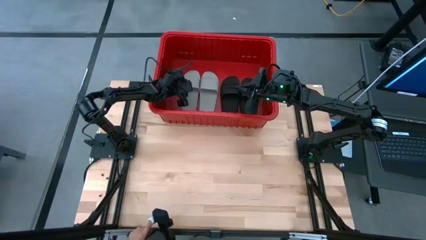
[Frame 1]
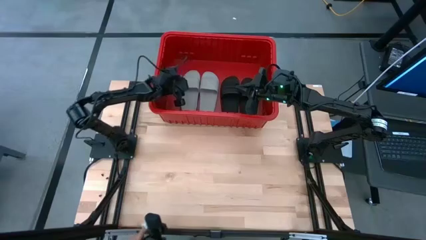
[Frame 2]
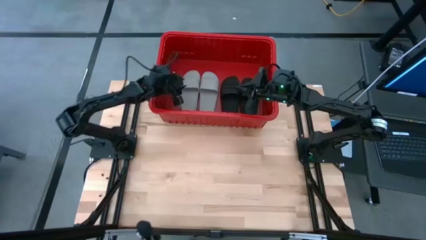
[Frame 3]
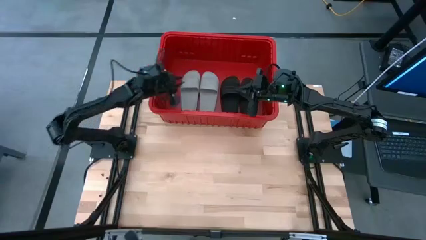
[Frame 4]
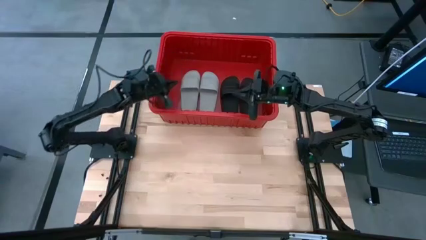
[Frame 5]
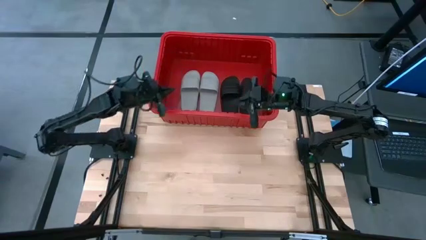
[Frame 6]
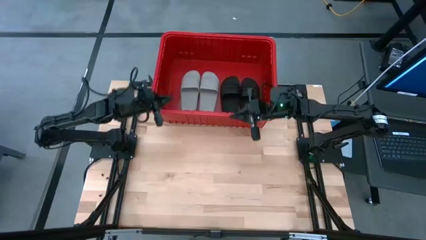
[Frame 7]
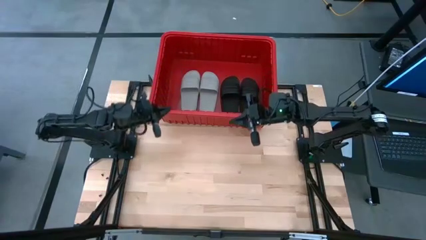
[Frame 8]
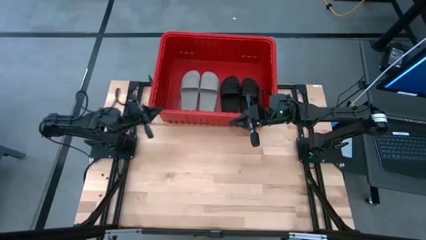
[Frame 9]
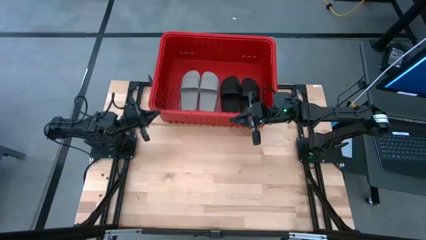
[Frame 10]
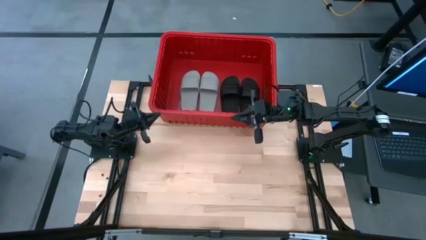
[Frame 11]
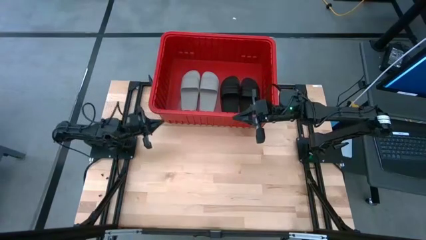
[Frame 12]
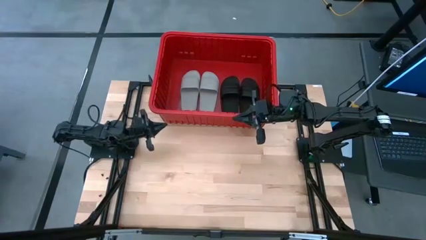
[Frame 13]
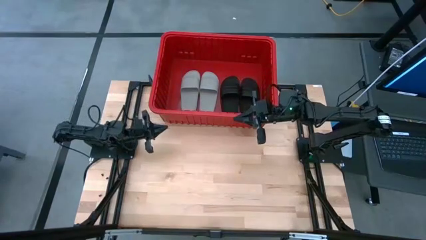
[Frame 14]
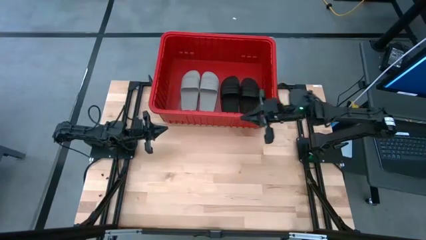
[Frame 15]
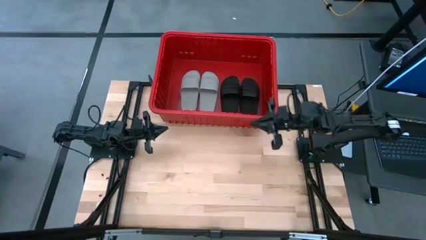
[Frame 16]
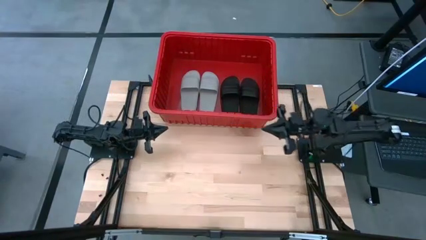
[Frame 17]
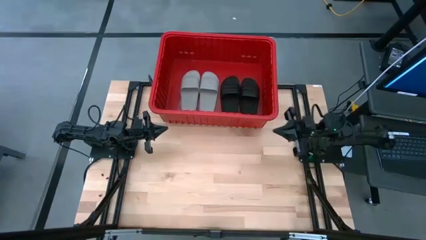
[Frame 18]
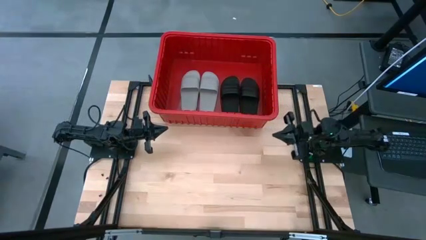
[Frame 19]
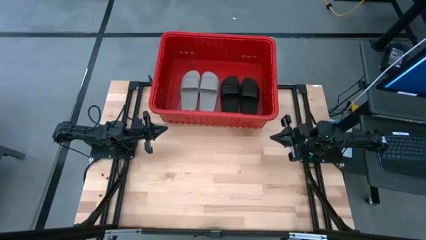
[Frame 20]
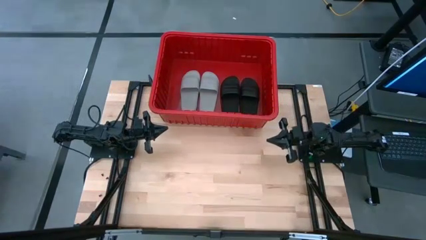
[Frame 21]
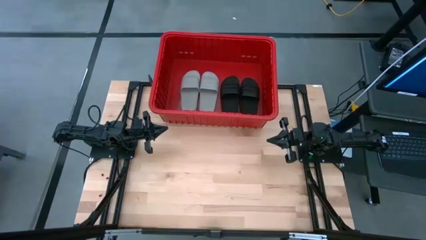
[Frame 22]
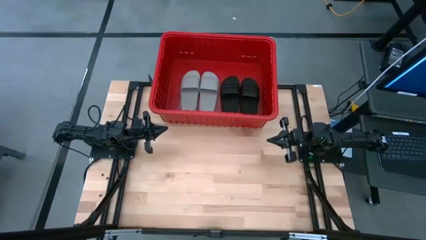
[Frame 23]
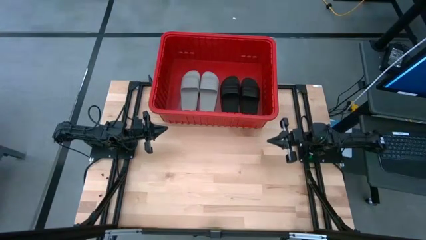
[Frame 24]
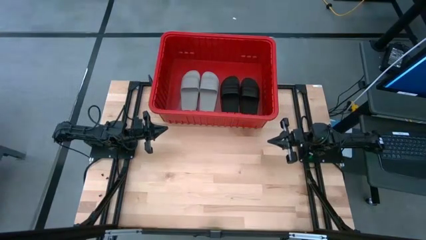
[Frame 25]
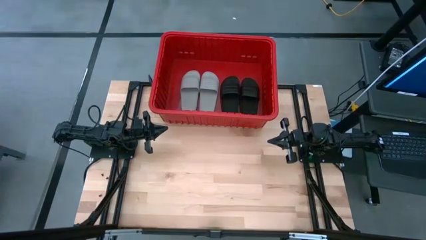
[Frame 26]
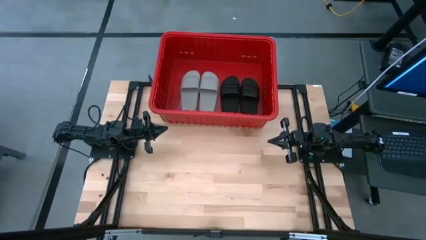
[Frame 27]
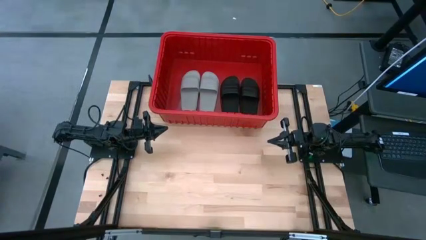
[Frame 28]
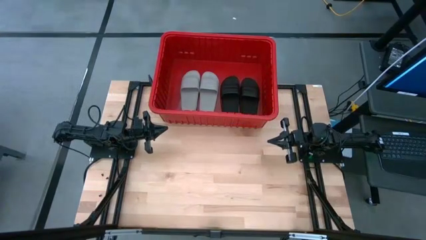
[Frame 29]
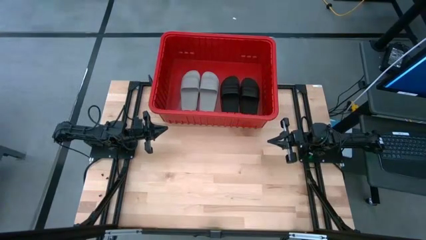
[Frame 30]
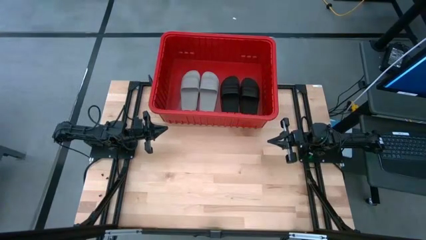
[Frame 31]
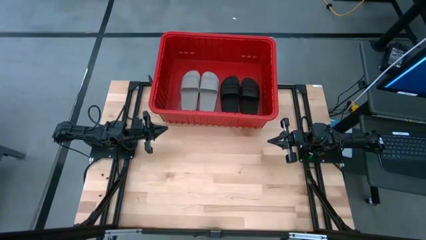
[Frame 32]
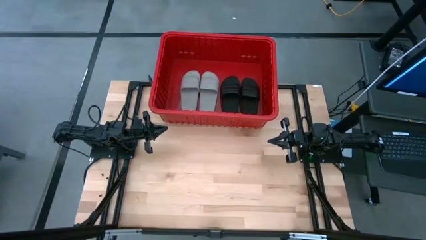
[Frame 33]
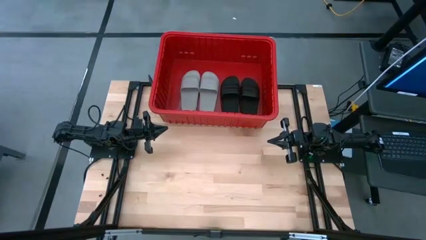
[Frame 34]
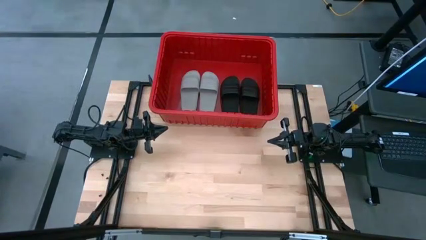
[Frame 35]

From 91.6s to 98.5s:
Task: Pick and place slides into bin
Return to Home Position

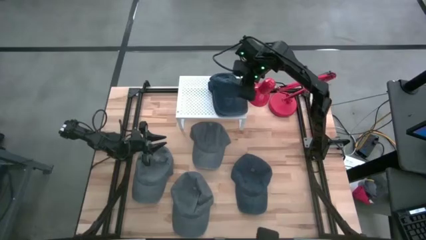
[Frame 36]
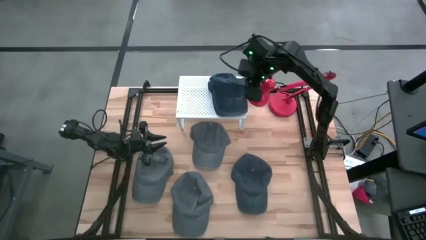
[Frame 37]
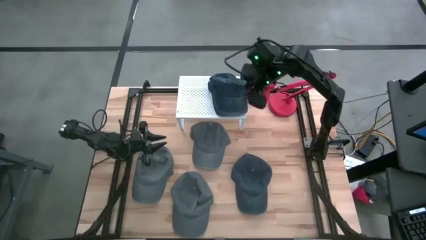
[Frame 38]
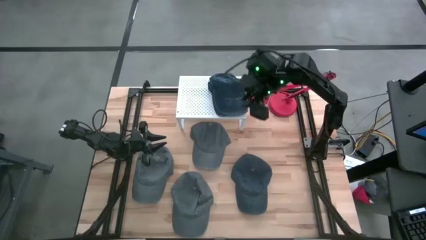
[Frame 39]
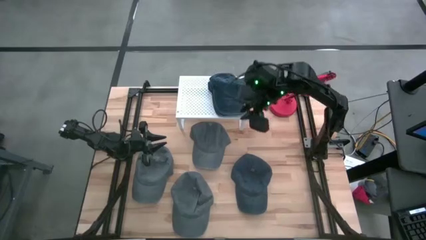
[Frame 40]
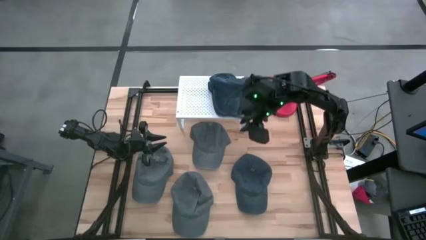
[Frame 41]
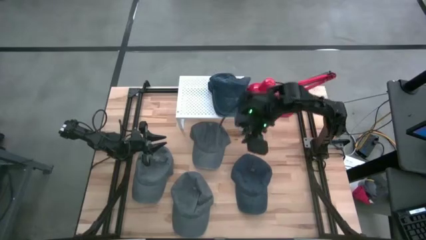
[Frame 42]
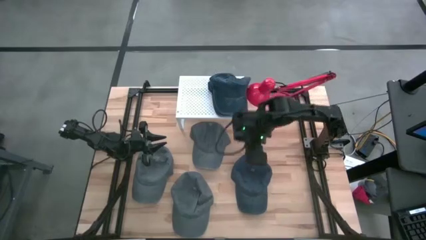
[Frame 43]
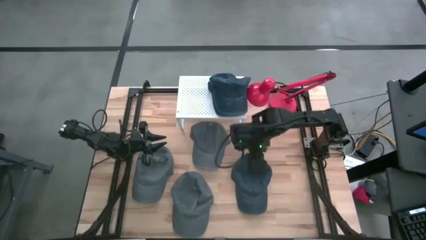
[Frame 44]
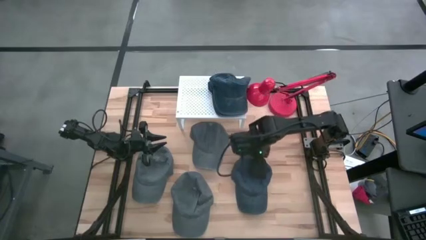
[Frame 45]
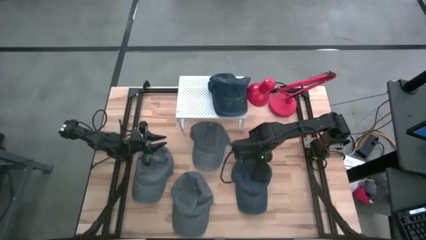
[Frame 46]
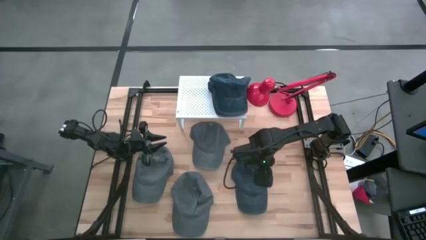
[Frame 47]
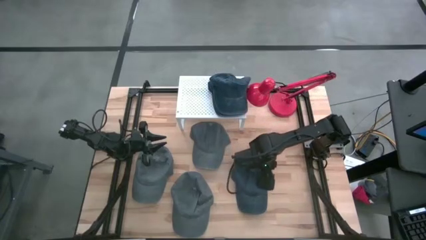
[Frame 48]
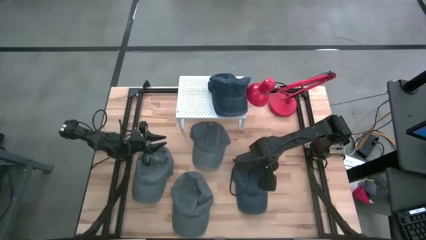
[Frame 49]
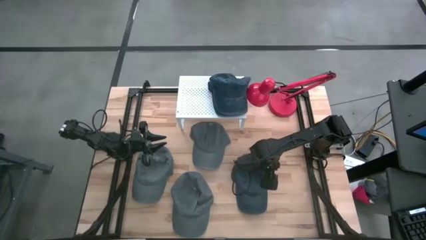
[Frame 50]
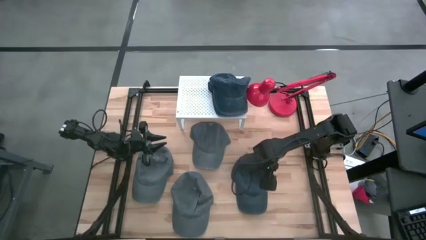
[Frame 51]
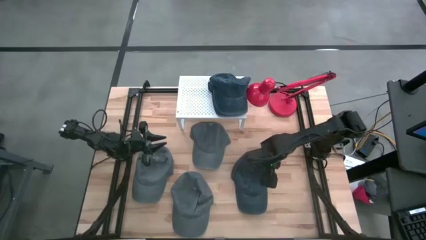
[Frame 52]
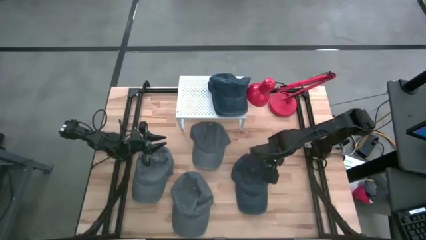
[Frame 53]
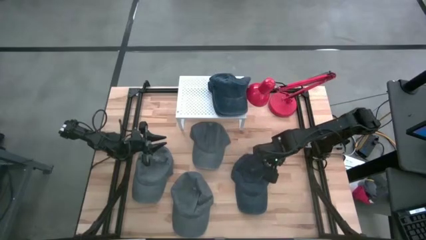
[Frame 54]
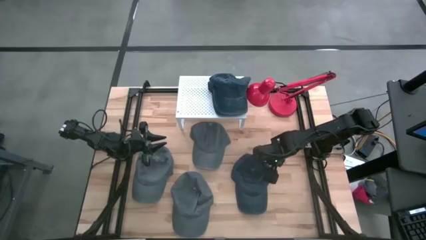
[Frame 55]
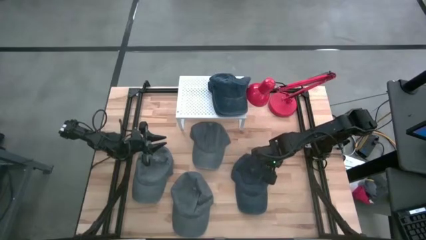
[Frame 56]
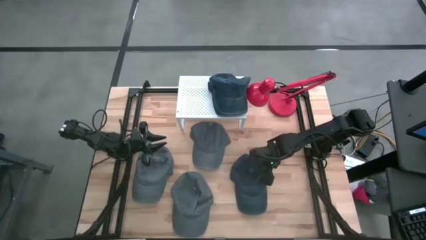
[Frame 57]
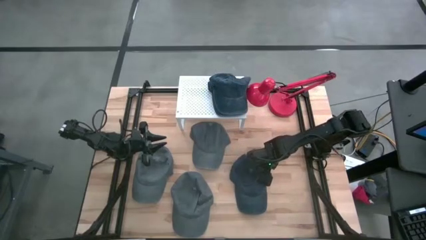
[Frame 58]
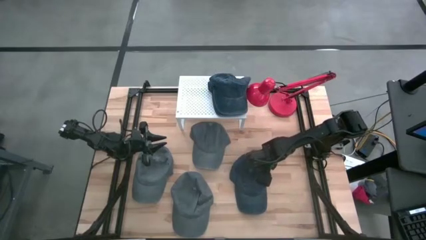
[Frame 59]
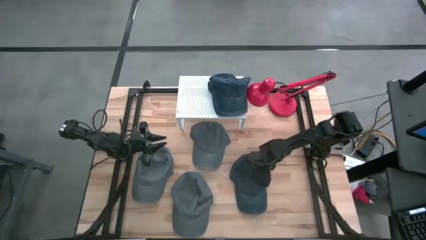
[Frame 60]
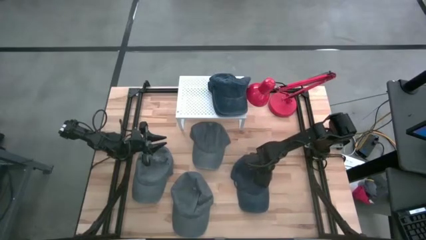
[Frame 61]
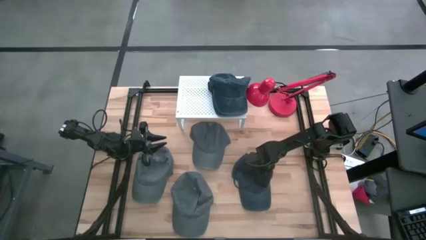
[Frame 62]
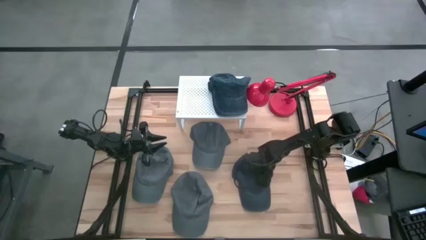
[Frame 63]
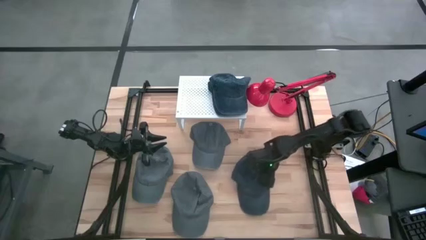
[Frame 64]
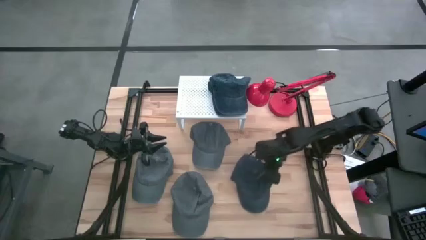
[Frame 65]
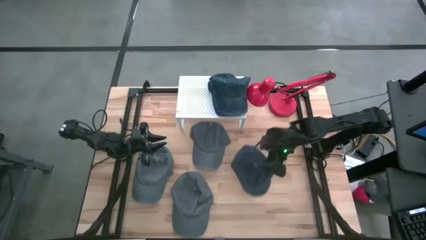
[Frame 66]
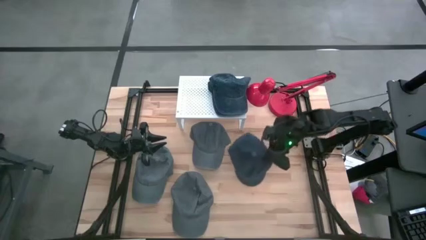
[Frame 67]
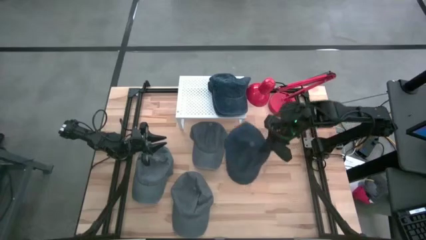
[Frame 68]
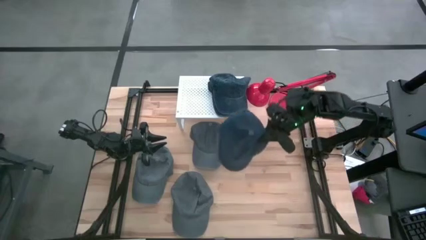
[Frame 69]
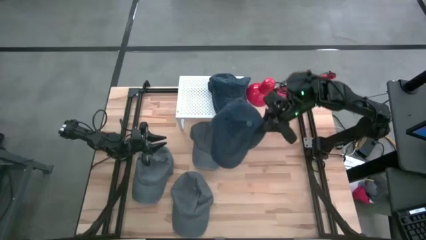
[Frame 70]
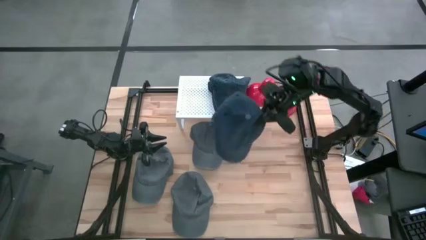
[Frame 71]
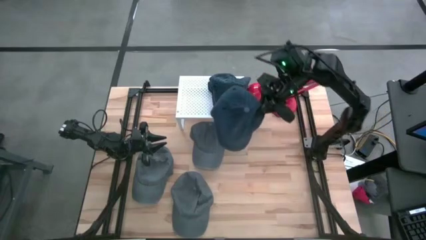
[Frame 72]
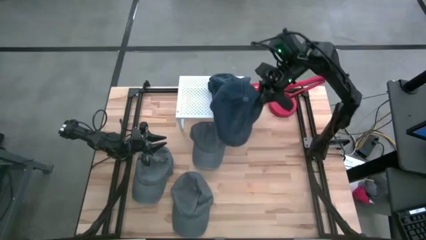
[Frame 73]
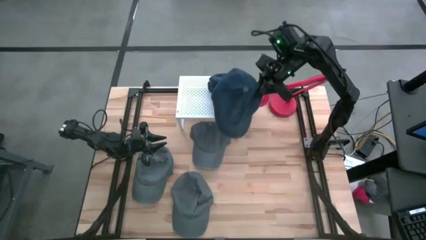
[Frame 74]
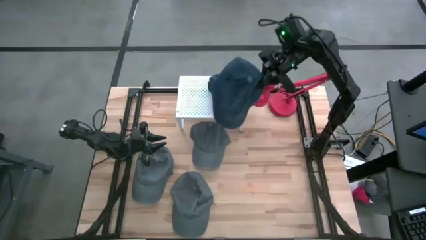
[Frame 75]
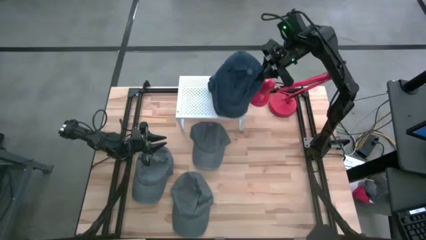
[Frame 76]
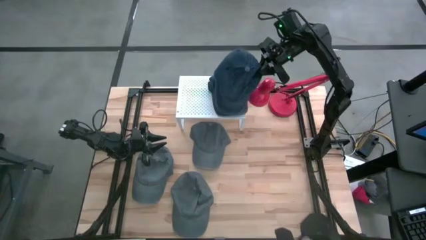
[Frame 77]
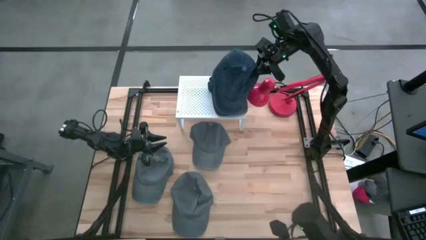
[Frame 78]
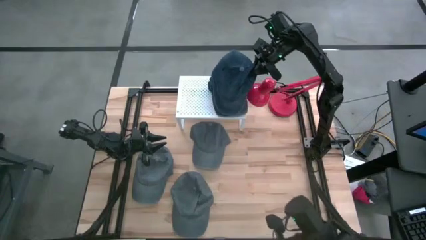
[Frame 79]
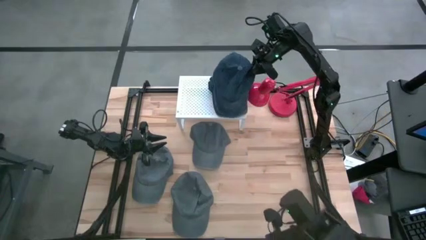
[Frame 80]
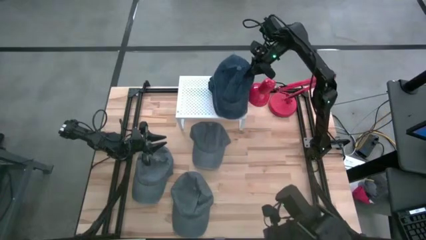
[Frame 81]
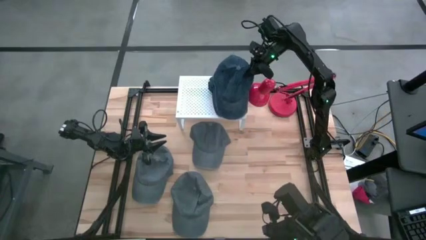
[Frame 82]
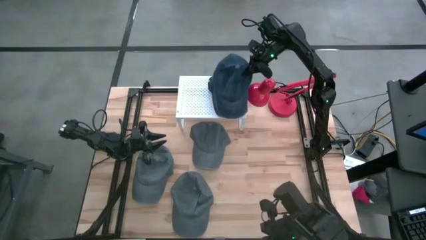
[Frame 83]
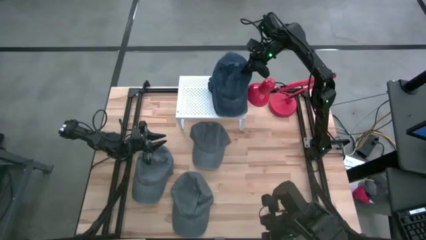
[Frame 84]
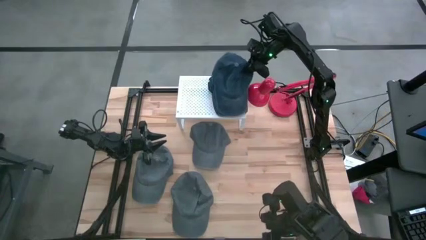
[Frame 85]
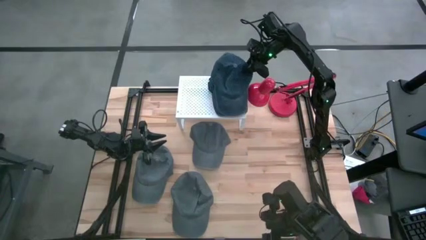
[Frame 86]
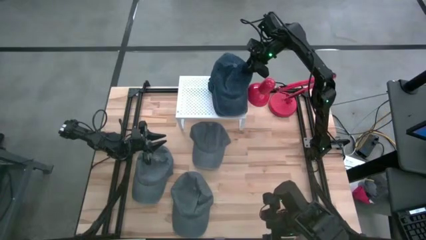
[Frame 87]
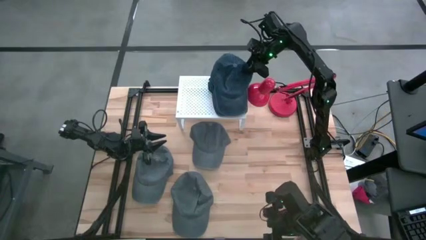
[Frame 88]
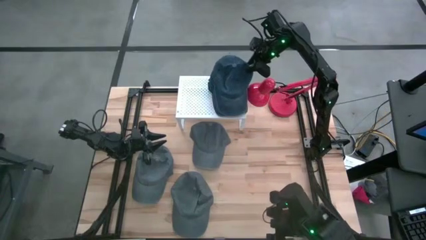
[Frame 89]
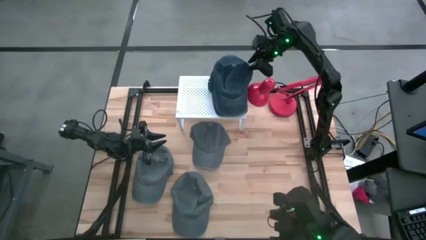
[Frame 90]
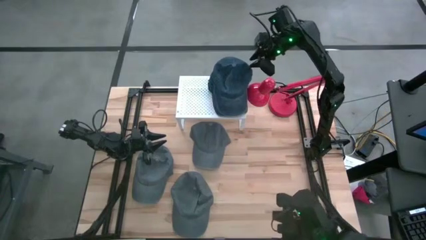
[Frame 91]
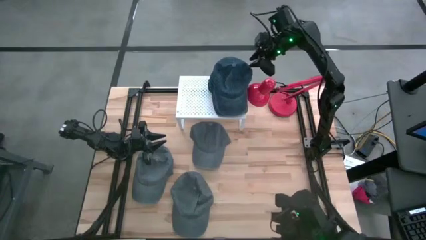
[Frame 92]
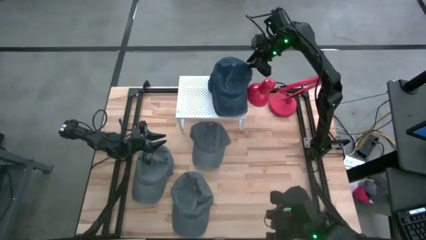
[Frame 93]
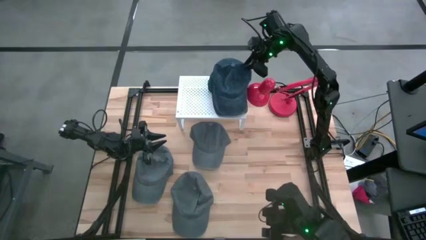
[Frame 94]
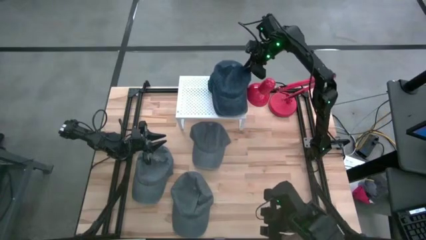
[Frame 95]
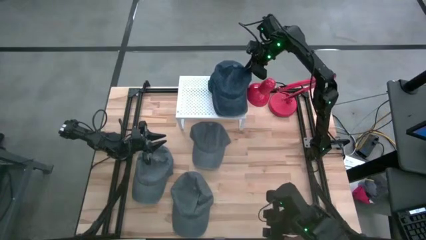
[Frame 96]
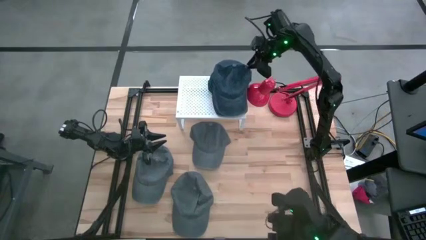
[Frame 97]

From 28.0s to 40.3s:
Task: Pick & Place hat
Stack the dark blue cap on the stacked dark blue caps on the shelf
